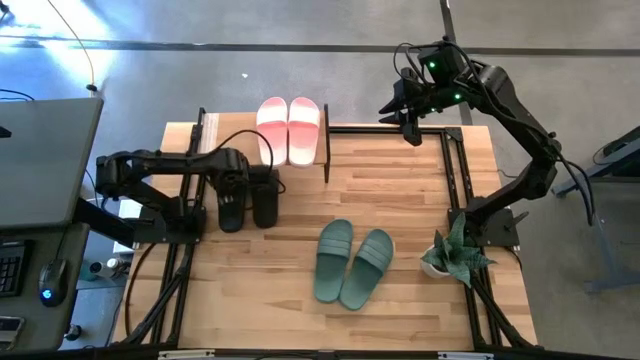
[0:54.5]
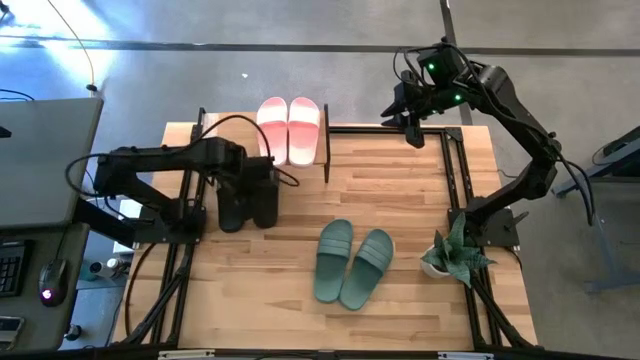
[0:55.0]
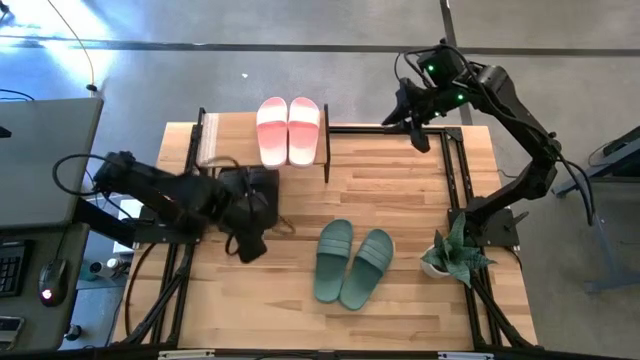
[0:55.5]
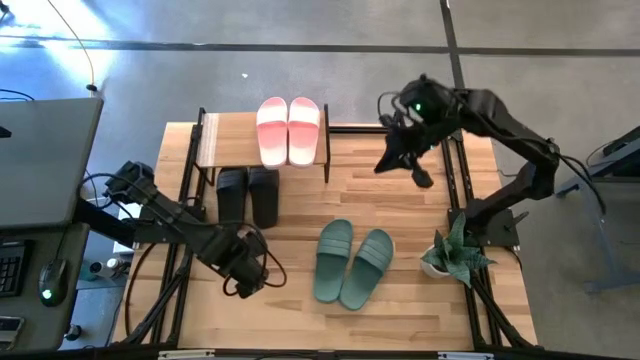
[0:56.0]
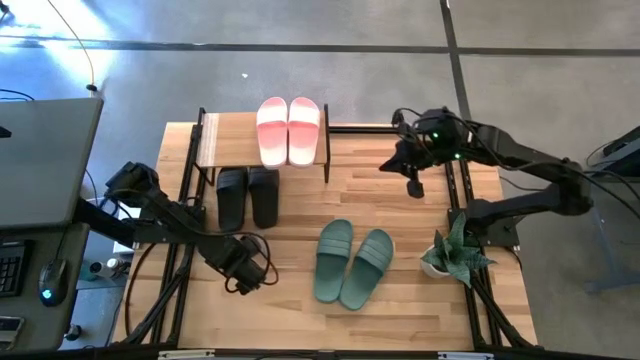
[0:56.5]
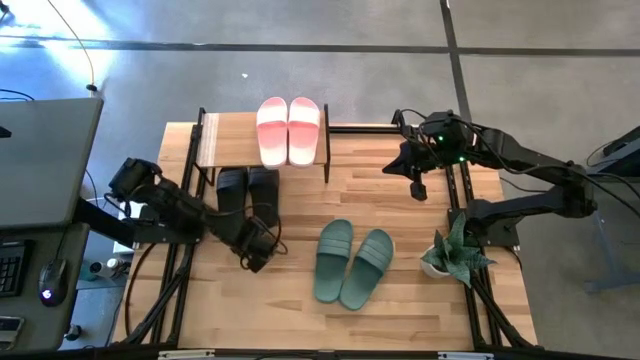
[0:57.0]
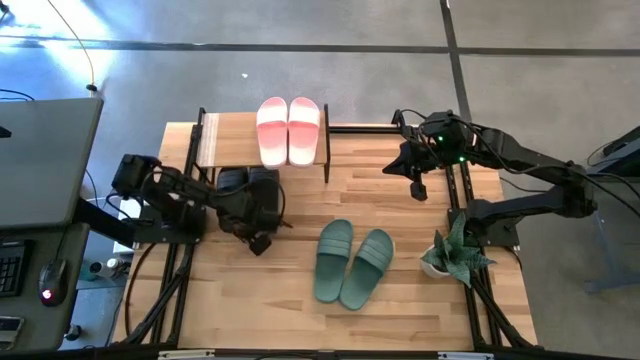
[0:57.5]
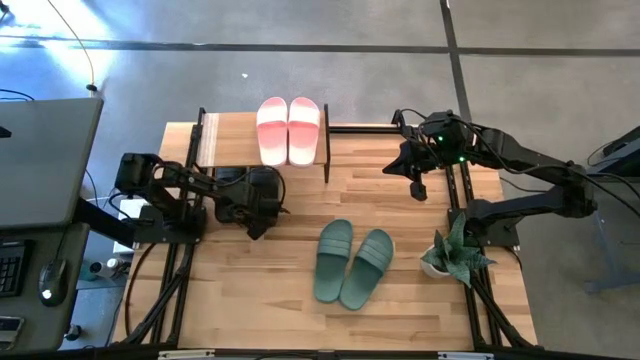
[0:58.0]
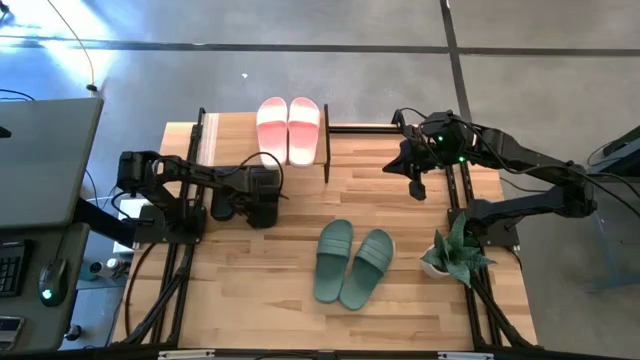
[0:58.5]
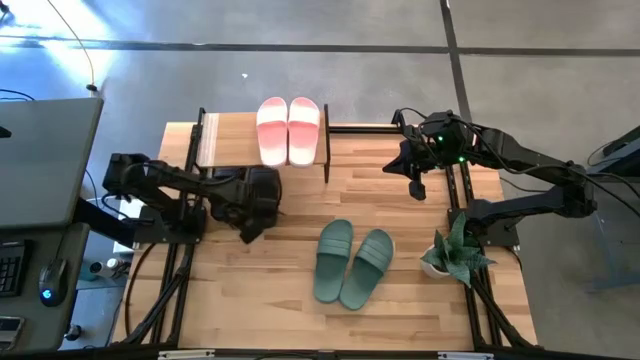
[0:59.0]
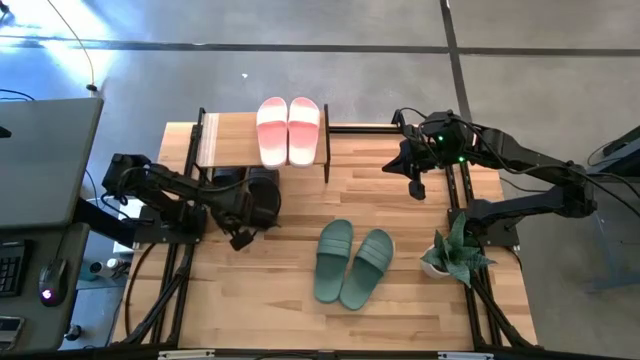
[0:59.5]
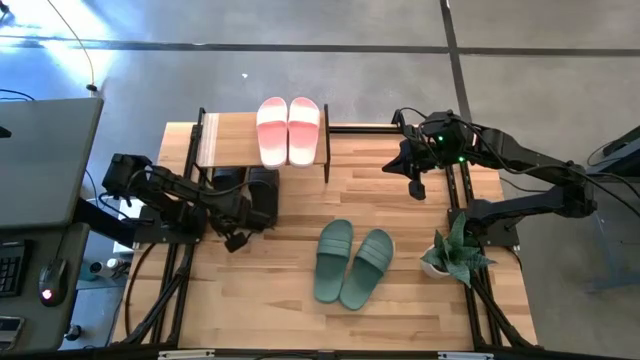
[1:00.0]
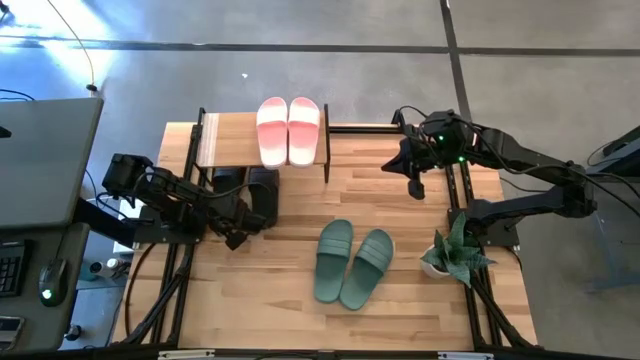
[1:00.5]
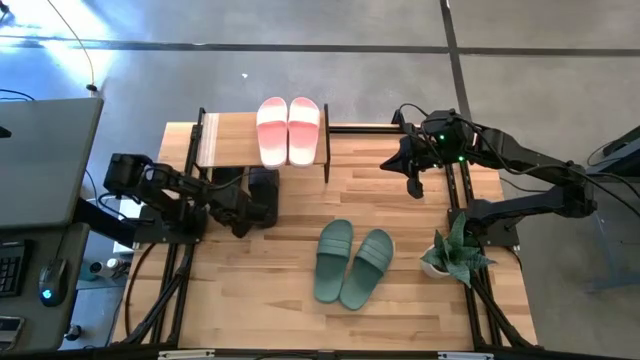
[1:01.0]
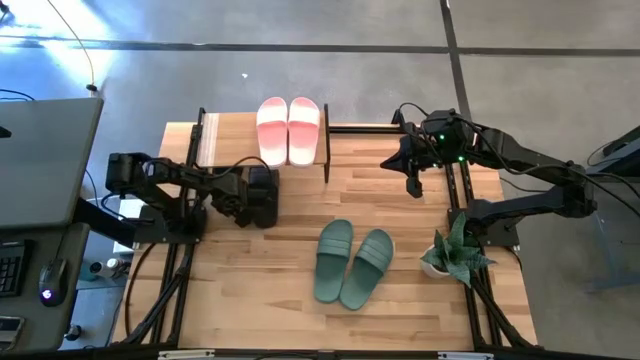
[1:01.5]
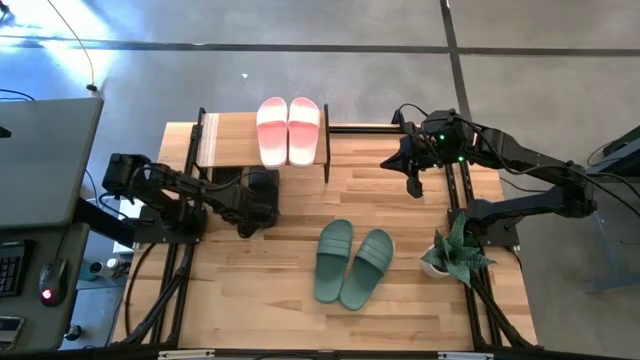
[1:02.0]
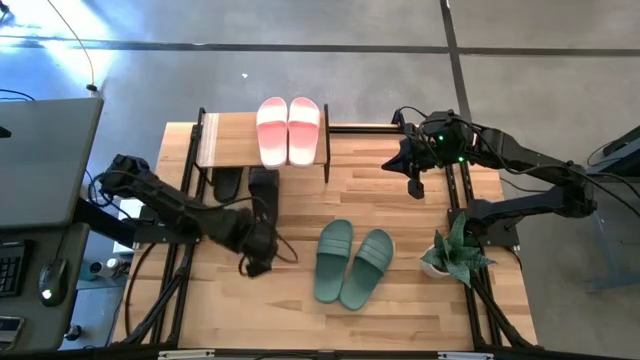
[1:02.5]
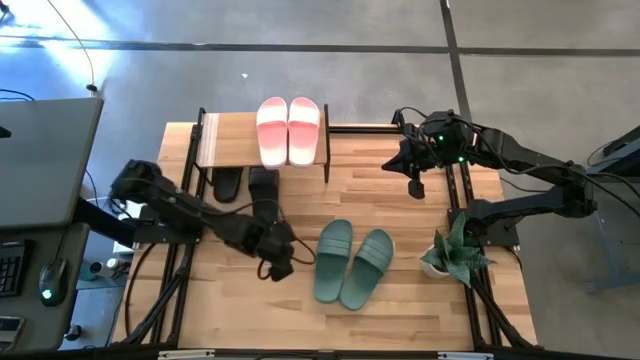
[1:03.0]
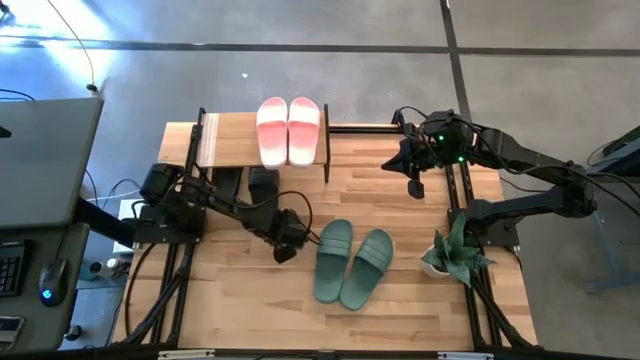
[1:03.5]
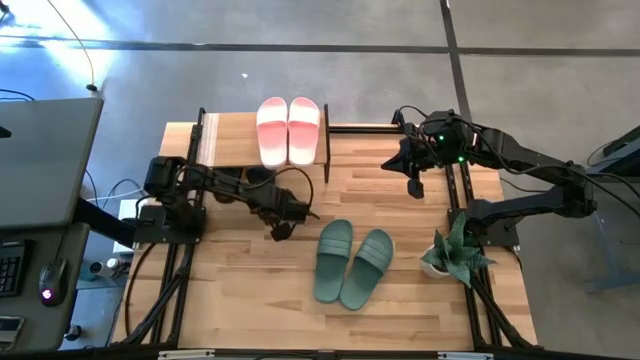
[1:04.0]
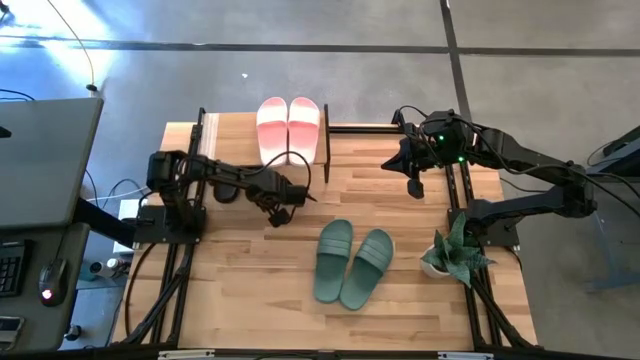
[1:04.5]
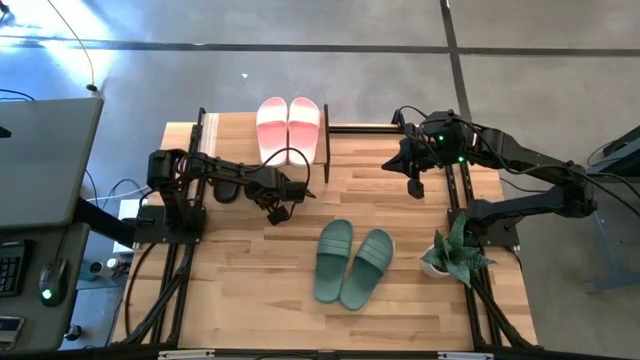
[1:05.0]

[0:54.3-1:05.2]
Task: Pick and place slides into the shelf
Adjust the black slides under the shelf

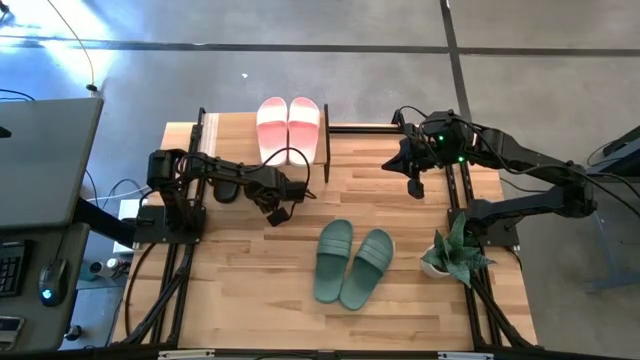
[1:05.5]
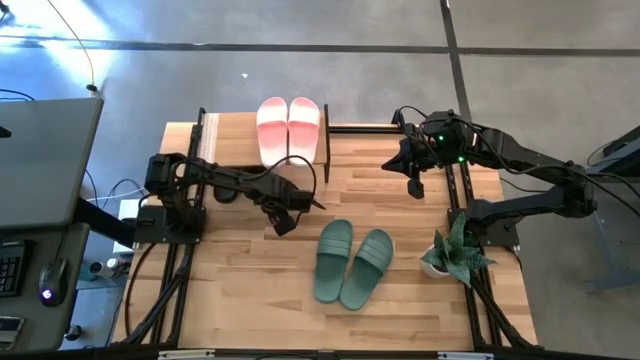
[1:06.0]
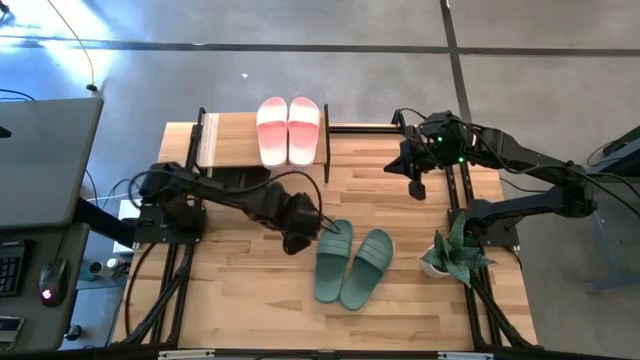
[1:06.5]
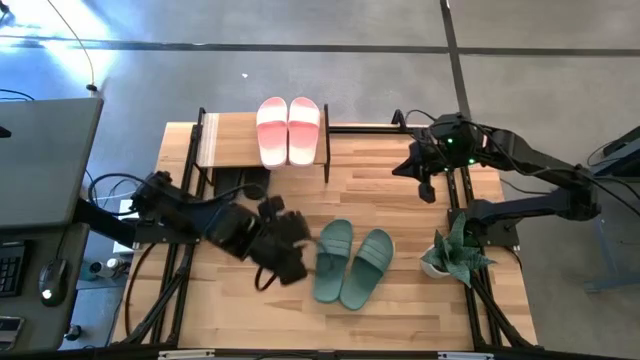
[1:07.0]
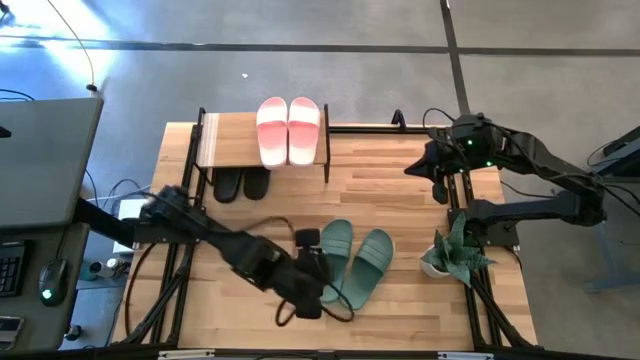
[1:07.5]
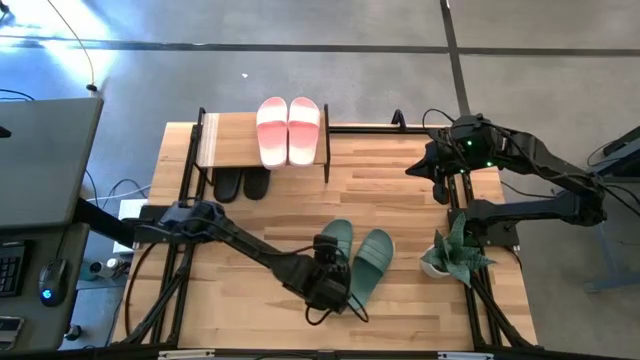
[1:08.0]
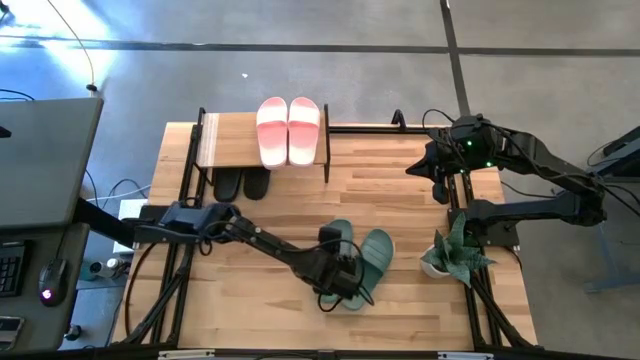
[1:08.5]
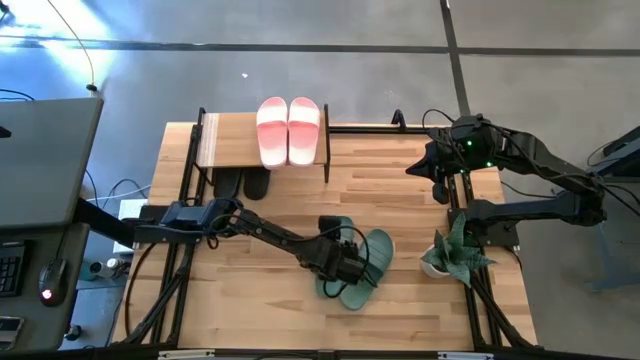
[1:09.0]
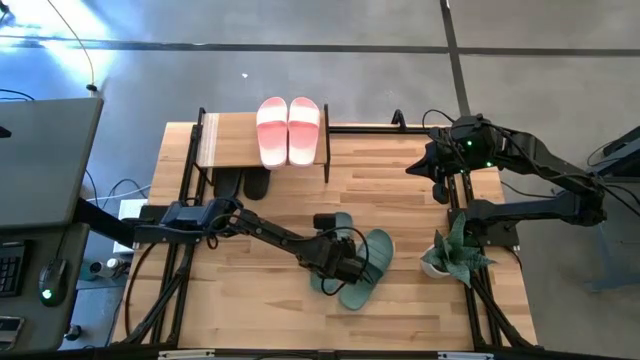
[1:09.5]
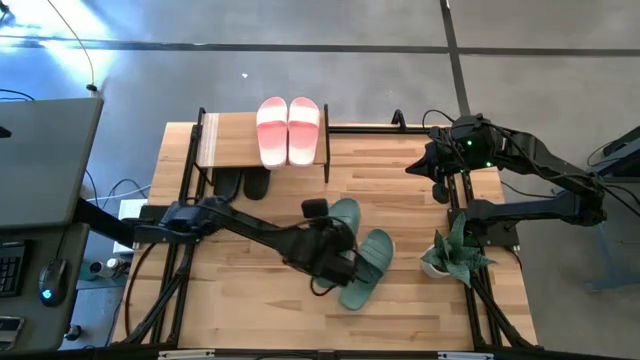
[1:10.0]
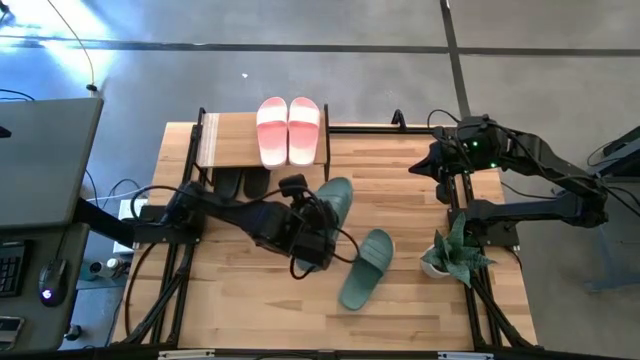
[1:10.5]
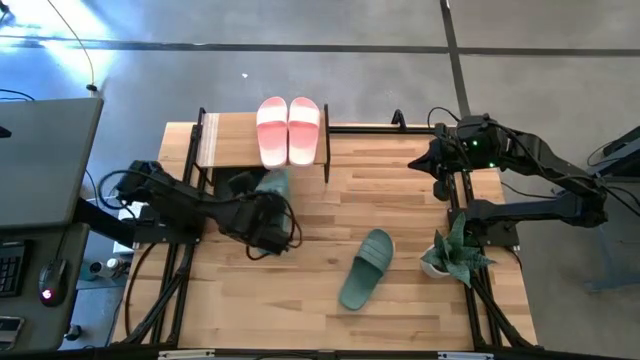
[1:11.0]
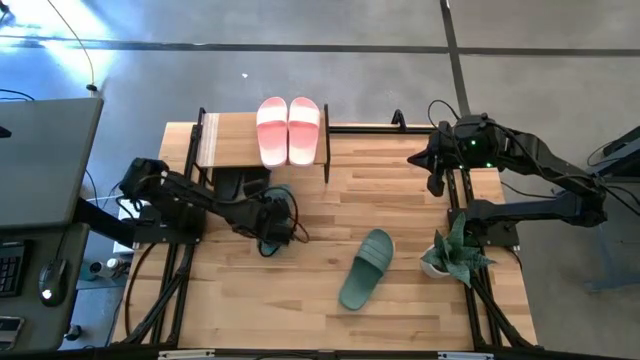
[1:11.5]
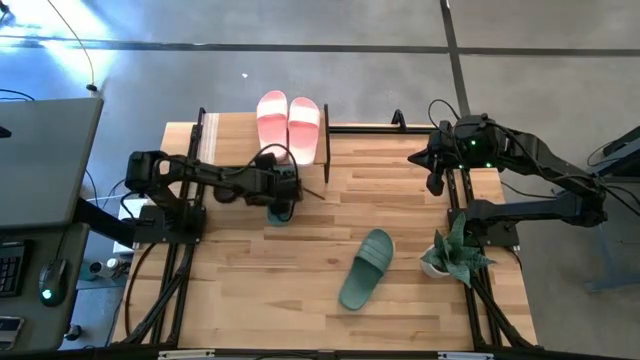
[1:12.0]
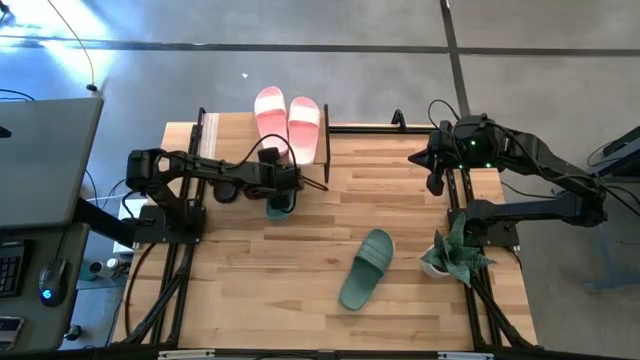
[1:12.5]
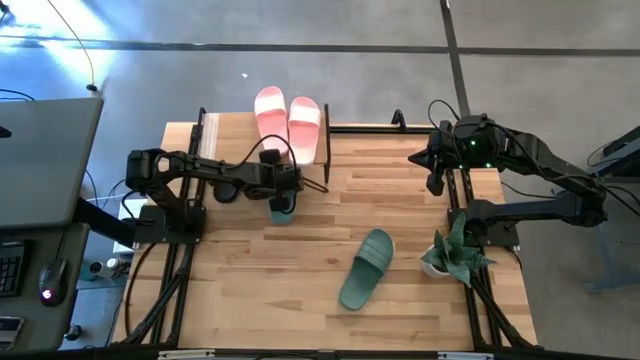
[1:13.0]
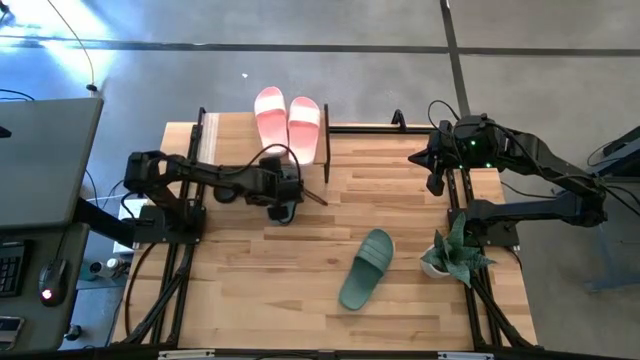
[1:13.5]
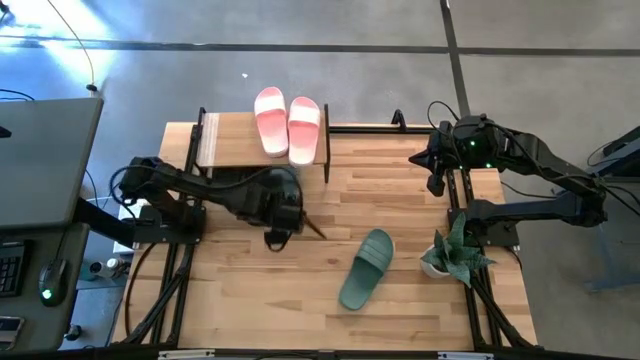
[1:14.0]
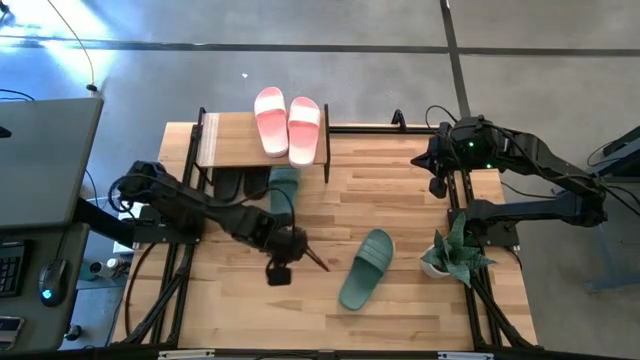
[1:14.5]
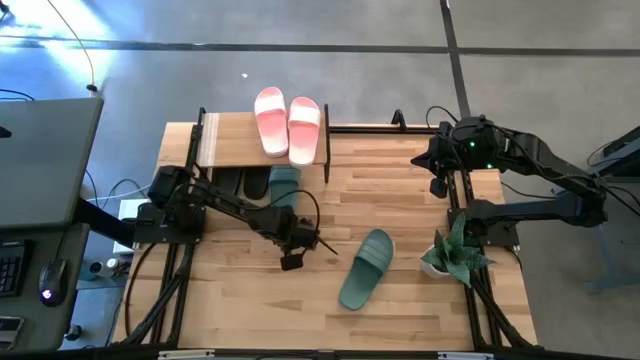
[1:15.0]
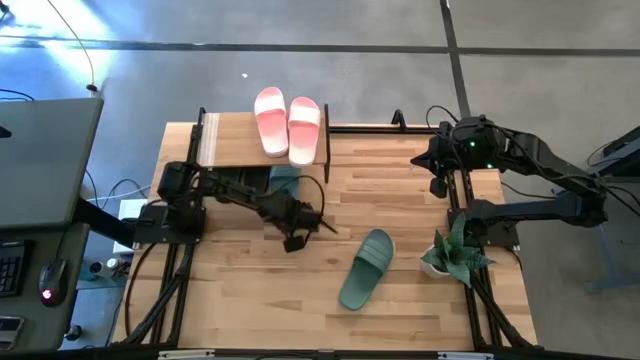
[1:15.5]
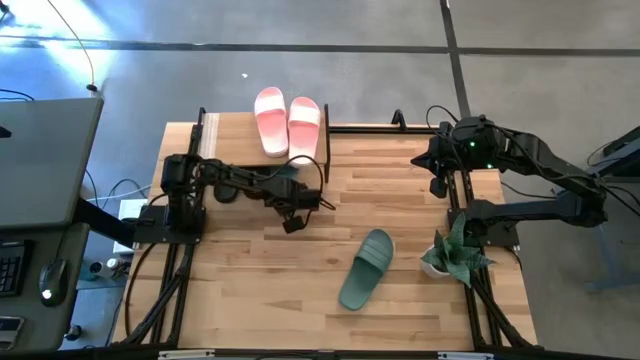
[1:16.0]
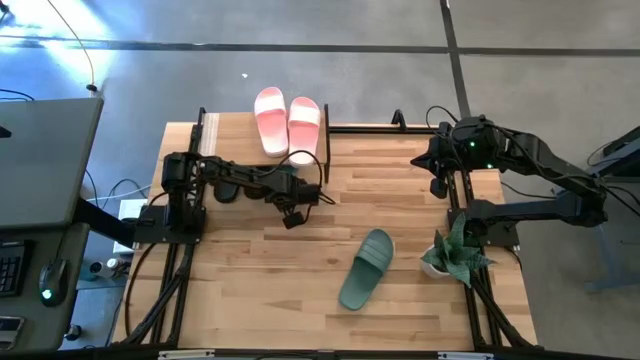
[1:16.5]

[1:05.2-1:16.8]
Put the left green slide under the shelf
